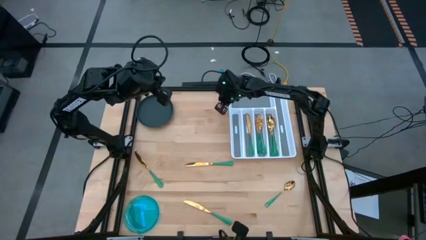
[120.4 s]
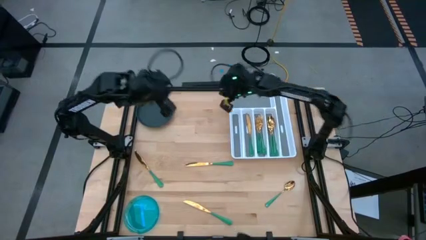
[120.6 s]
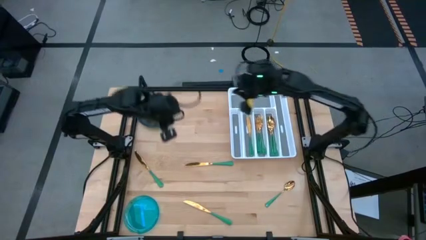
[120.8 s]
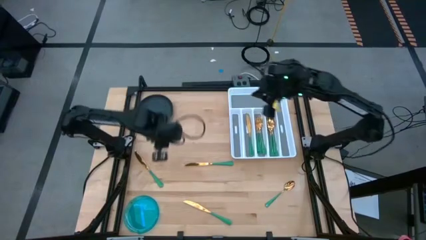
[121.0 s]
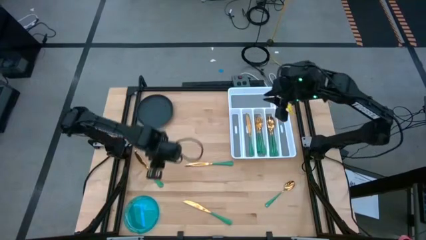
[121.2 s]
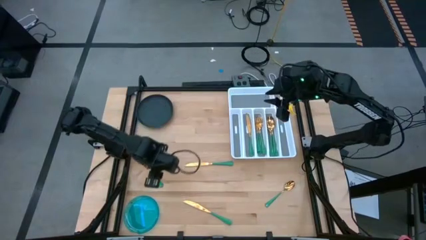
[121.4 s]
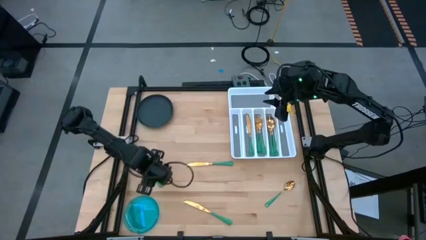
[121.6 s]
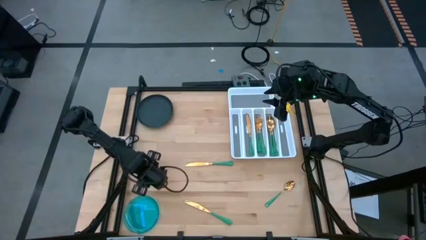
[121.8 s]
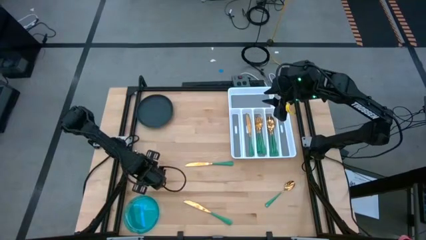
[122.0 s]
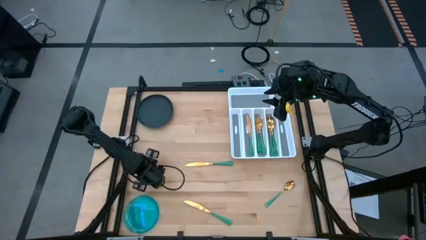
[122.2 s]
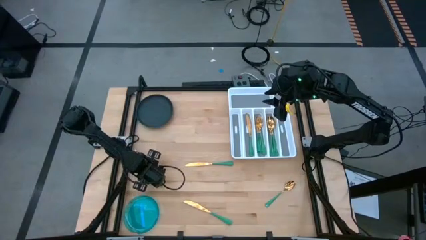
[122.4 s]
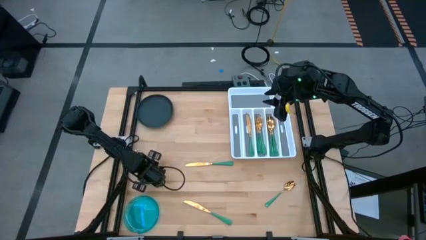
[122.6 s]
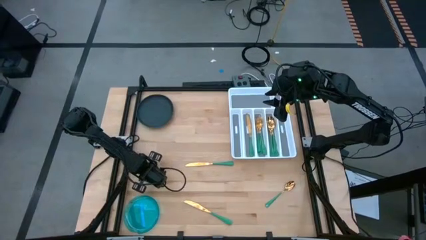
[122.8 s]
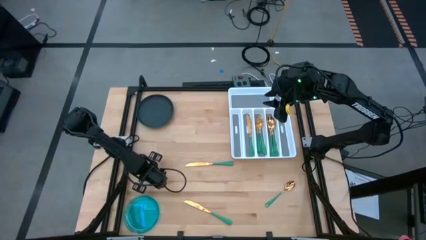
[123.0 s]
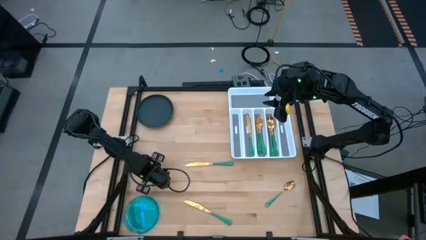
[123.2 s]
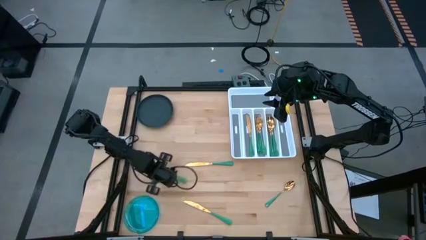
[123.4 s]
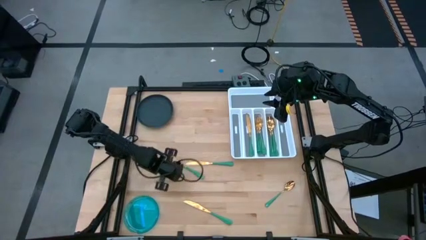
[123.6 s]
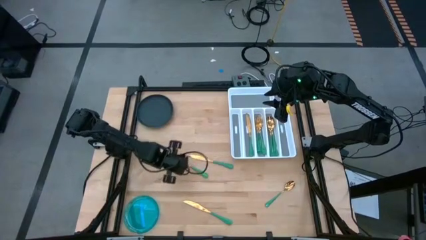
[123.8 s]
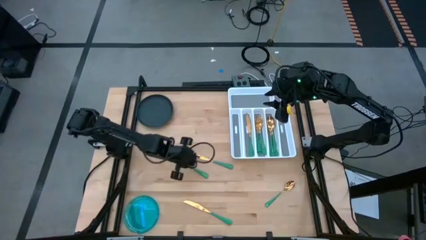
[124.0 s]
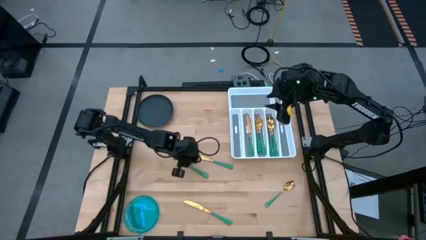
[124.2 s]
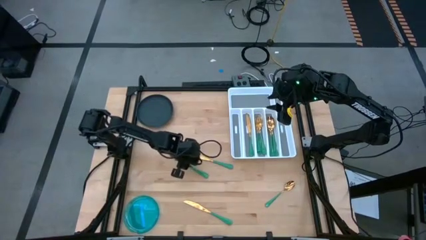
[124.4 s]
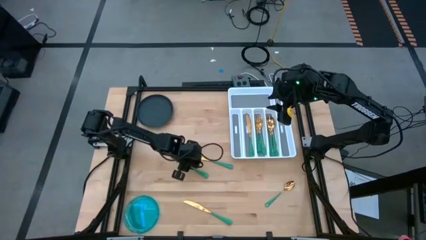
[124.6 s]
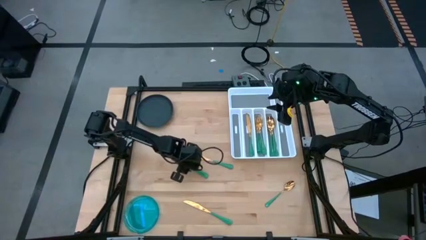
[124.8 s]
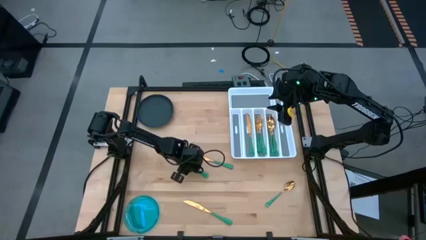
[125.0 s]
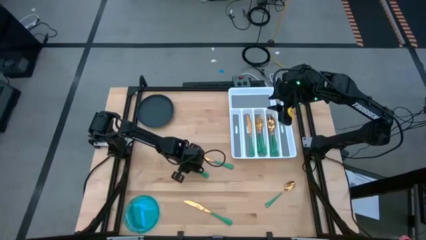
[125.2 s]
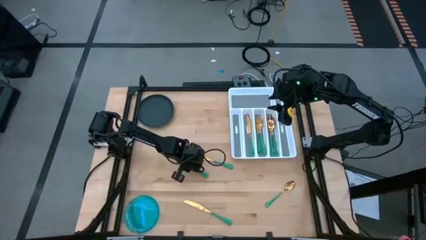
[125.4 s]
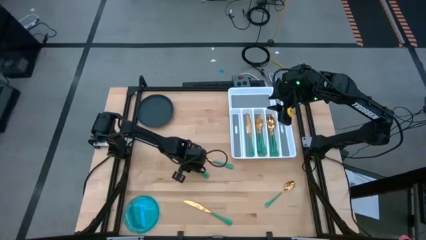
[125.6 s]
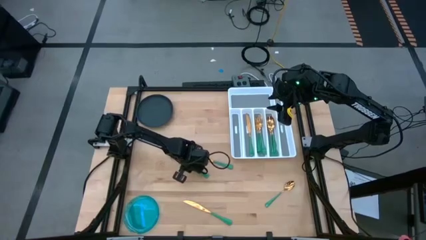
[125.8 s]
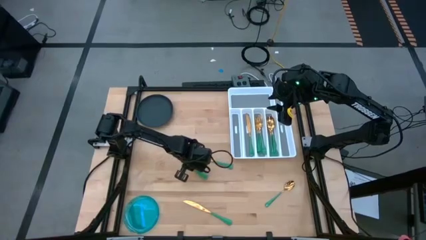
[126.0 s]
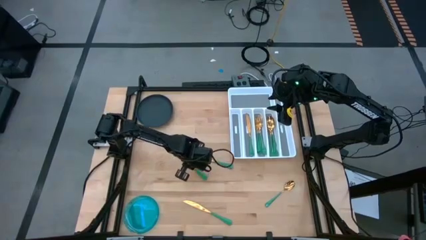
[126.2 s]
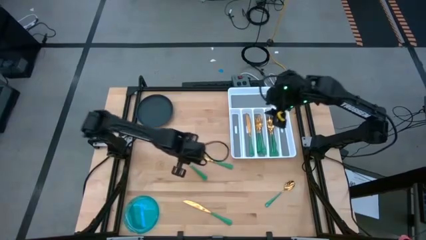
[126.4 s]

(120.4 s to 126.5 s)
Task: Sort silverware
Put the green knife into the white silverware organizer

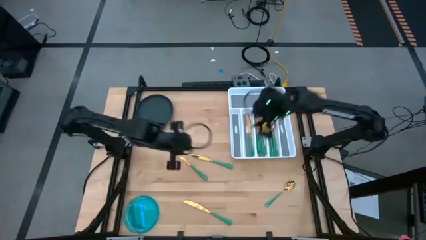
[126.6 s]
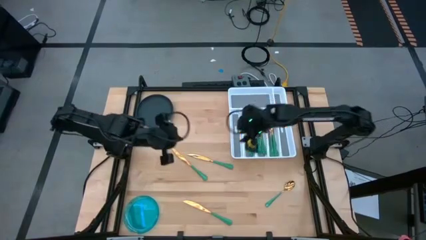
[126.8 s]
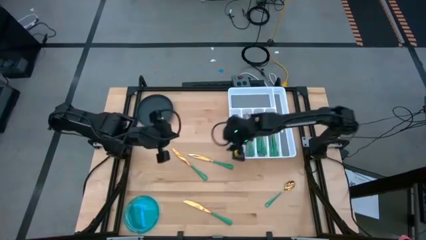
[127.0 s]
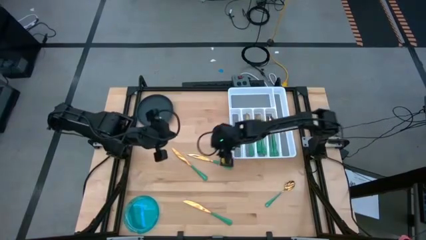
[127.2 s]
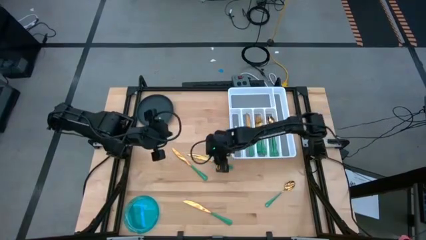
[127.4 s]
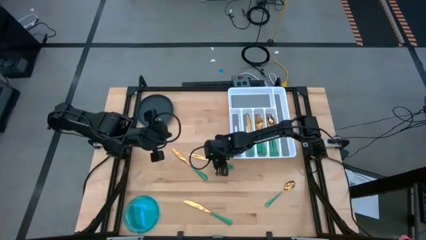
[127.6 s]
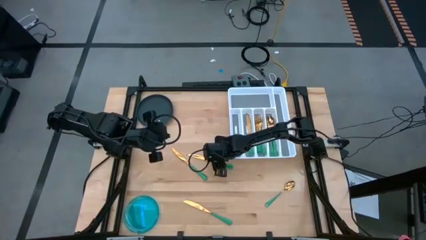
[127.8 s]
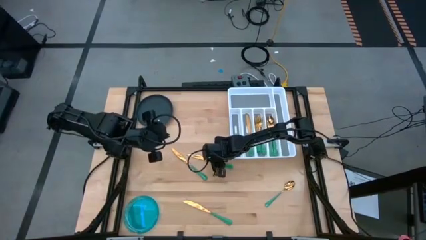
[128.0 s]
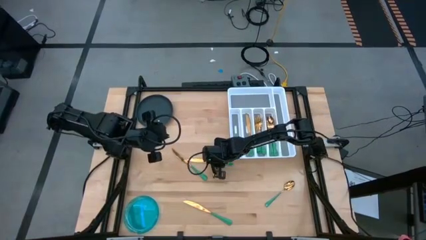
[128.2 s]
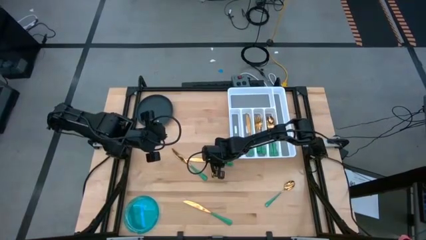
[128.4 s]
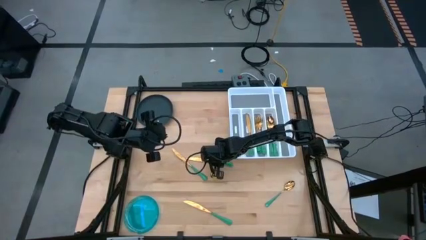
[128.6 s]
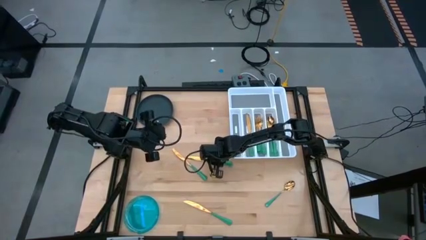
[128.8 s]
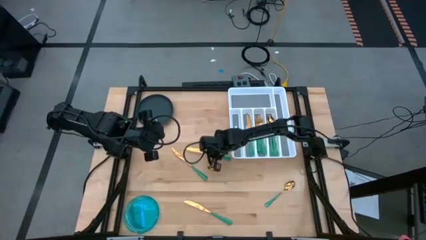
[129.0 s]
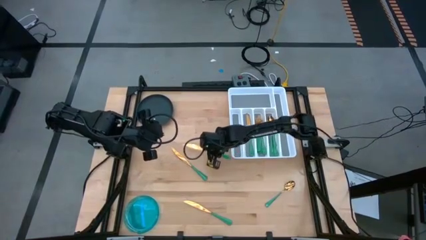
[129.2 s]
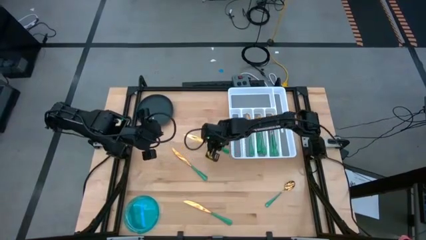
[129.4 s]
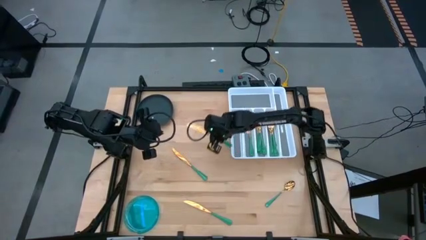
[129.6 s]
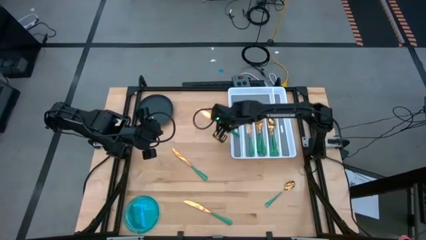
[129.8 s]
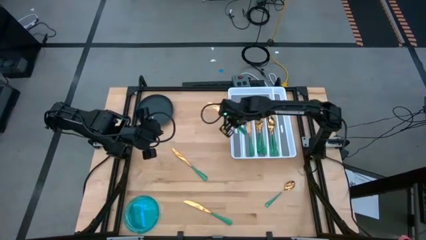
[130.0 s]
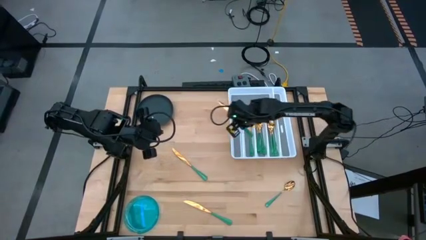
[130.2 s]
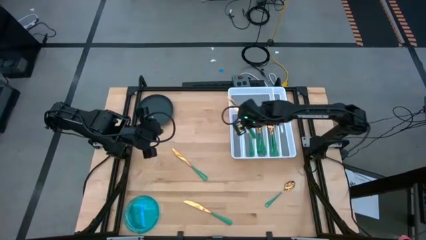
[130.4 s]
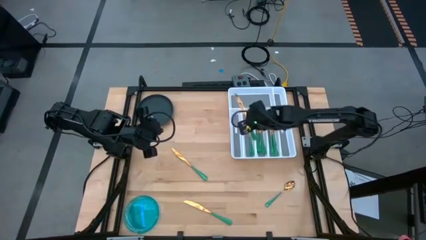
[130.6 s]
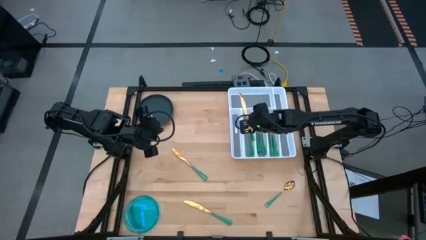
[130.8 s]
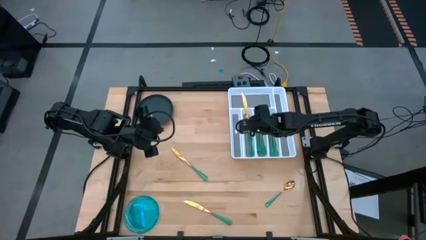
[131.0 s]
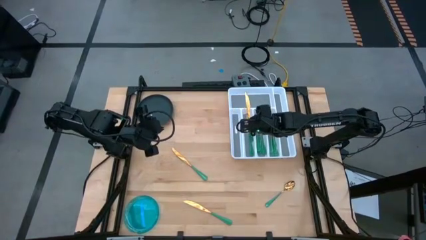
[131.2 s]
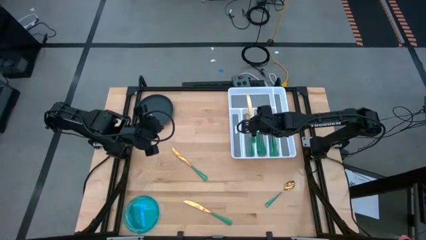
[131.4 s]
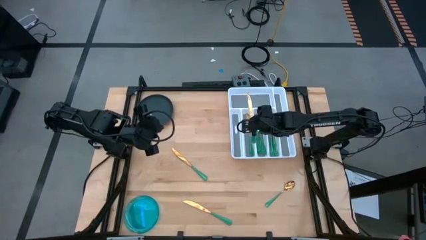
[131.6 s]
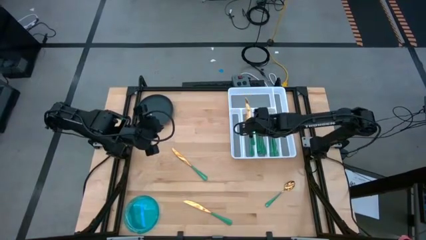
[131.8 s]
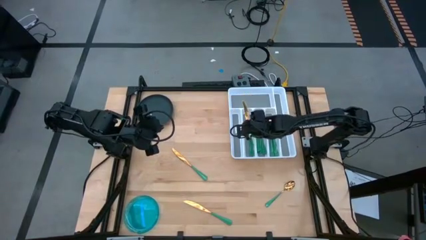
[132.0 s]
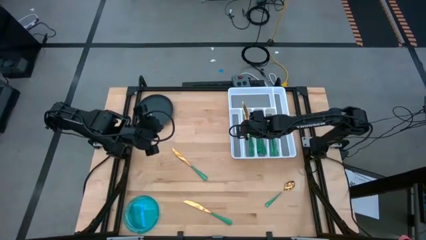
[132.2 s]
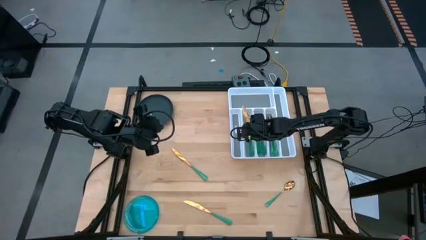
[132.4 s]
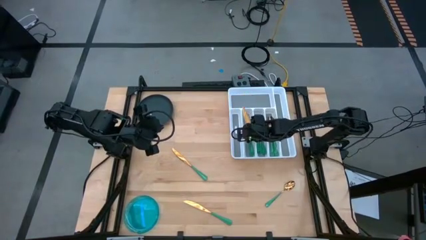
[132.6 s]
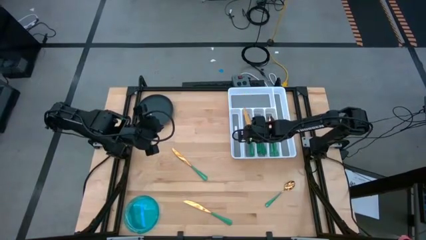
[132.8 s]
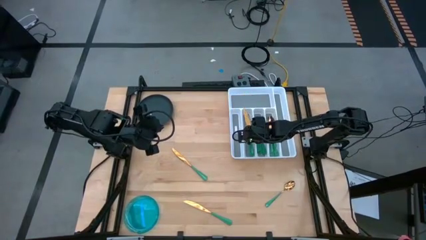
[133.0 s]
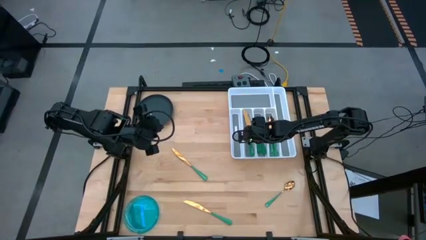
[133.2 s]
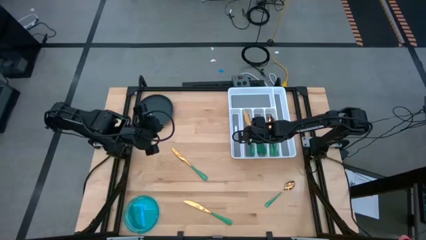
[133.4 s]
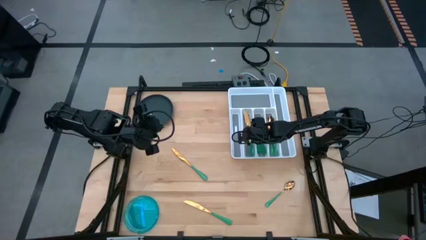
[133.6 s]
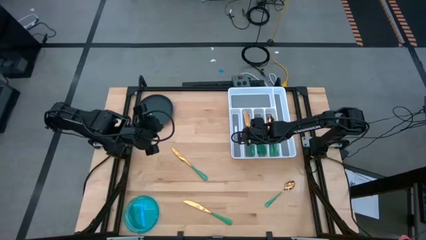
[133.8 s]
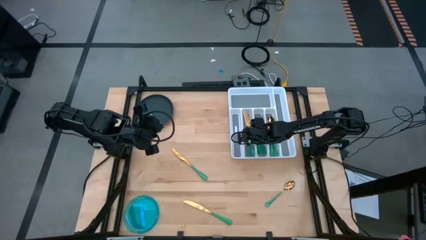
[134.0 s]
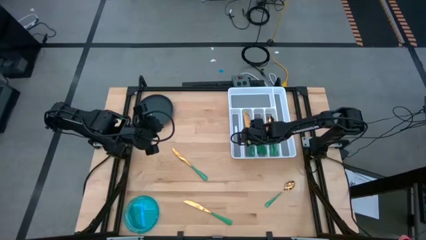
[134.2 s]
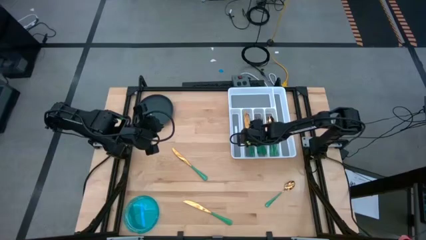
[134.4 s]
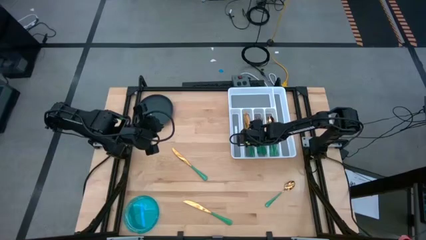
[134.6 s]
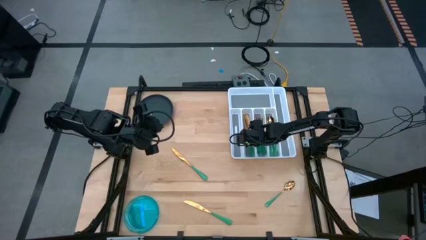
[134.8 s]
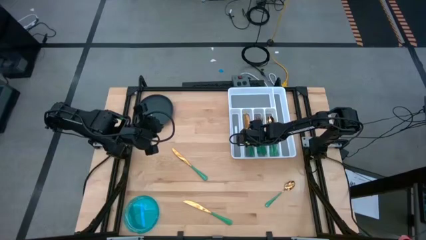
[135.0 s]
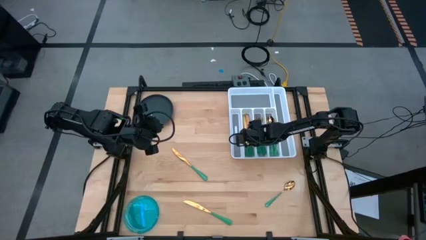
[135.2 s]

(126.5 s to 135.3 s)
Put the green knife into the white silverware organizer

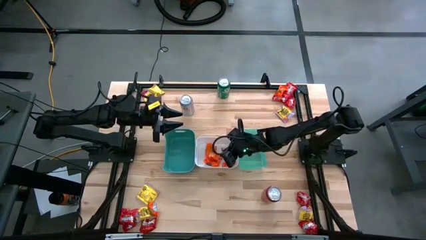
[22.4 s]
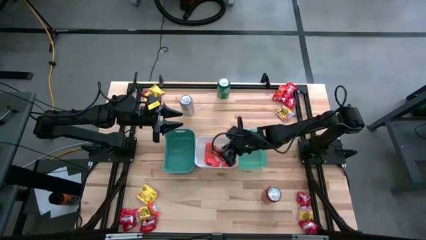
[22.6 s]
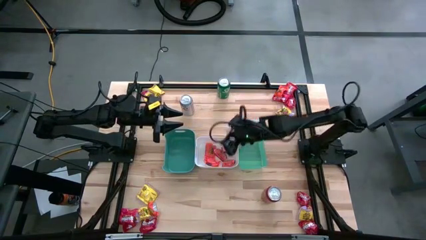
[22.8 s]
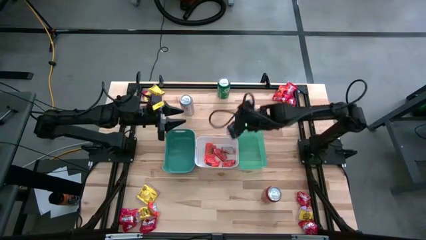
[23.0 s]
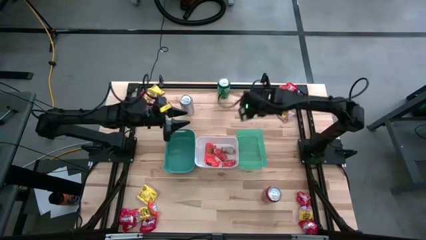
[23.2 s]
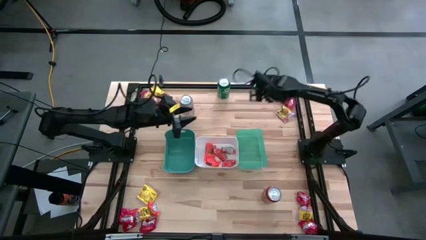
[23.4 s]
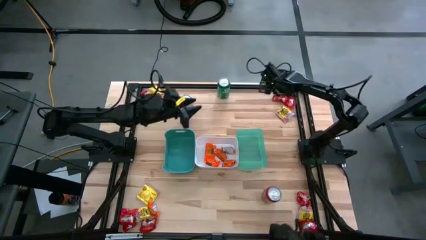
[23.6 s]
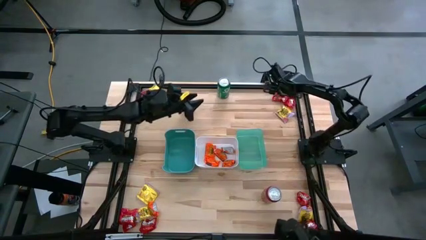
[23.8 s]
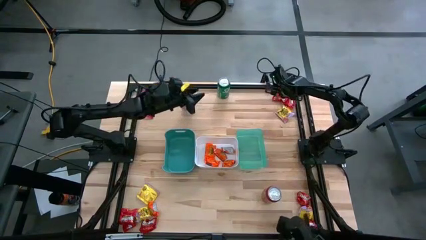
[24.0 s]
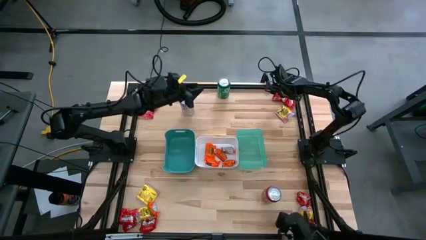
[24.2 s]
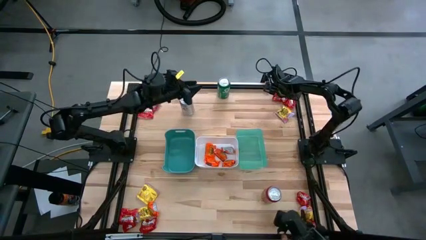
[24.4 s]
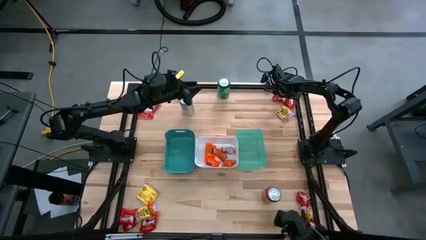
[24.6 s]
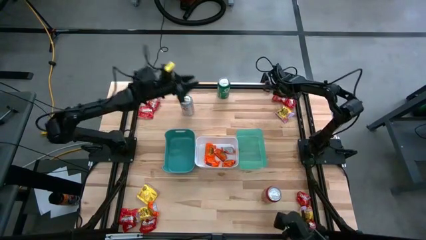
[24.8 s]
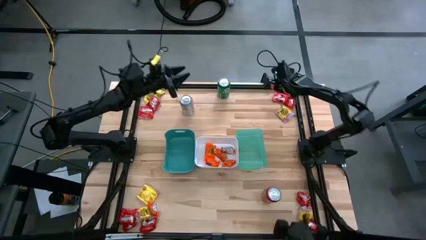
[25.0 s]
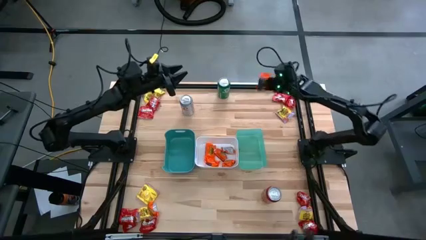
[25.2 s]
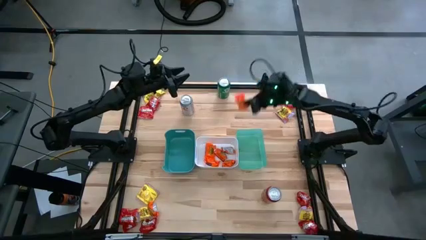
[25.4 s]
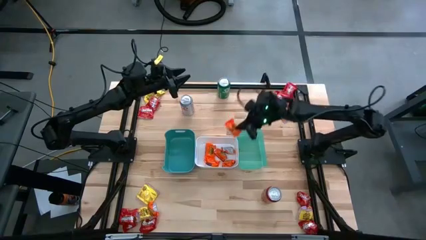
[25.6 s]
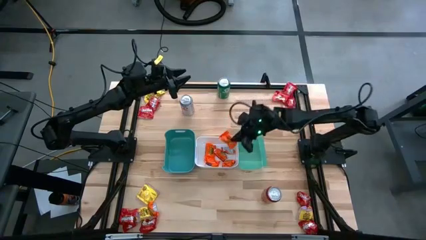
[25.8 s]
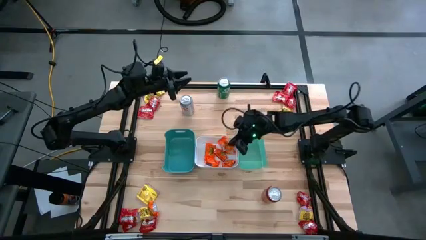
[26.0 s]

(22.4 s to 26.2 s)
Task: Sort candy
Put the orange chocolate into the white bin
